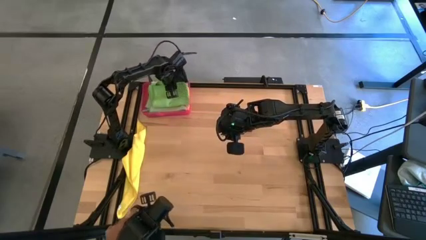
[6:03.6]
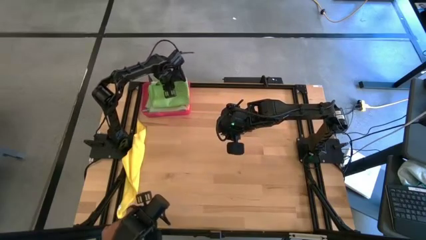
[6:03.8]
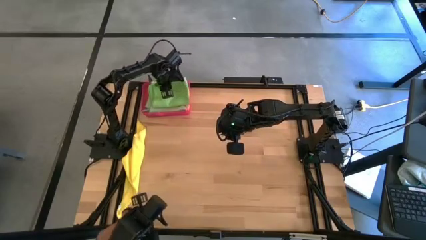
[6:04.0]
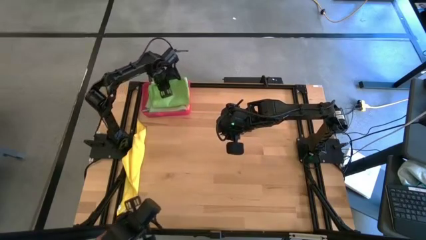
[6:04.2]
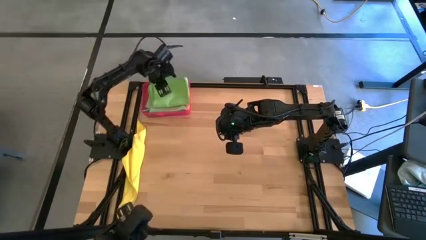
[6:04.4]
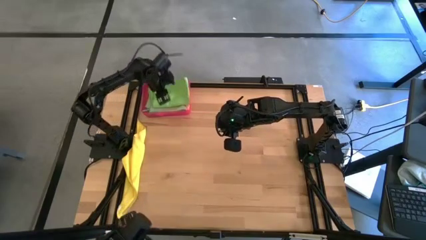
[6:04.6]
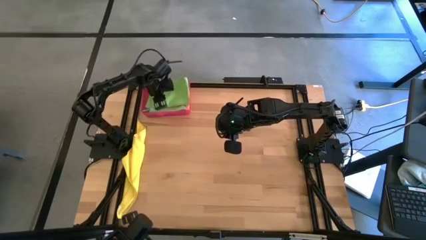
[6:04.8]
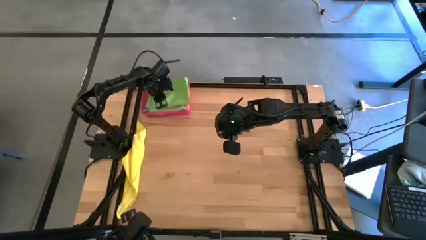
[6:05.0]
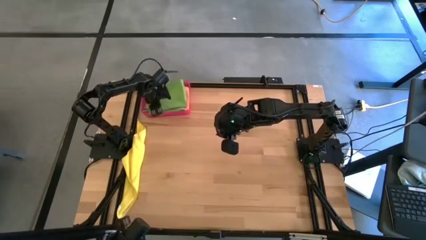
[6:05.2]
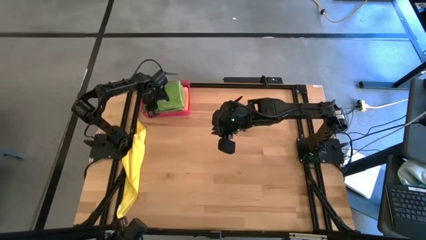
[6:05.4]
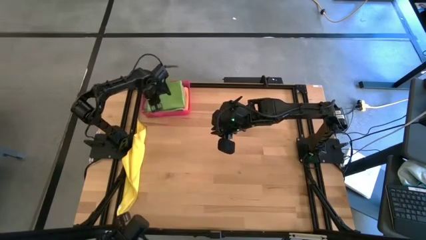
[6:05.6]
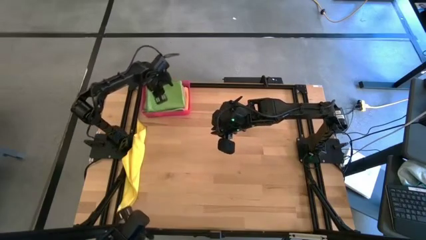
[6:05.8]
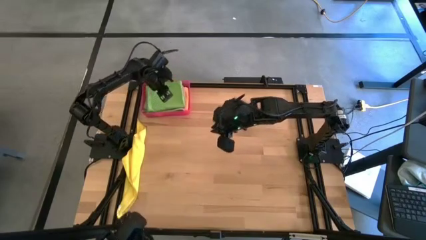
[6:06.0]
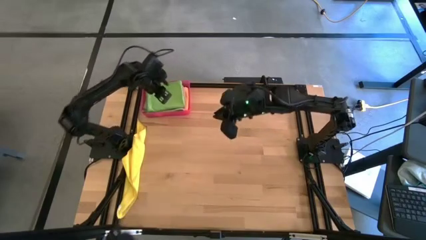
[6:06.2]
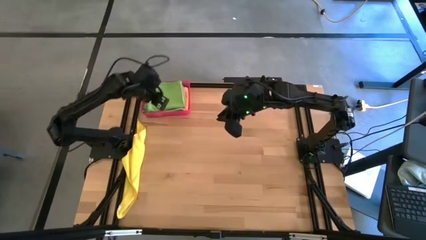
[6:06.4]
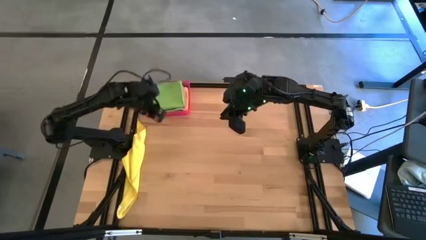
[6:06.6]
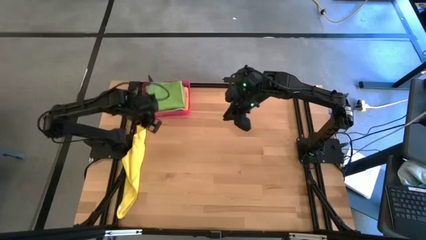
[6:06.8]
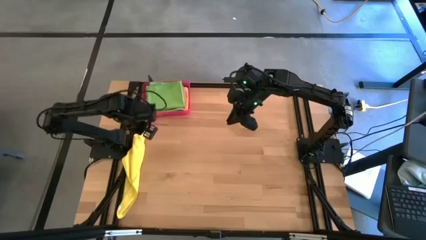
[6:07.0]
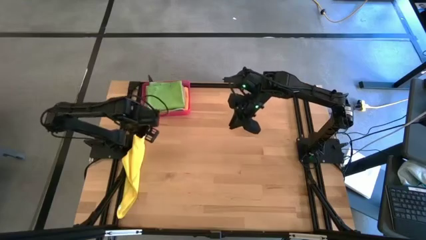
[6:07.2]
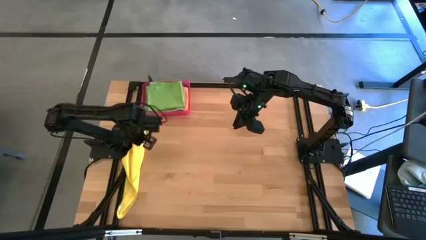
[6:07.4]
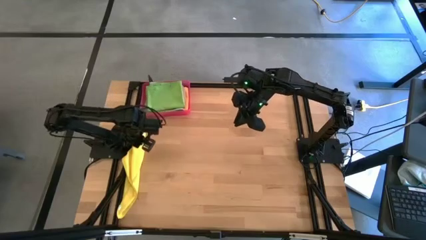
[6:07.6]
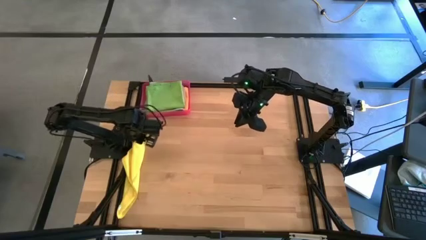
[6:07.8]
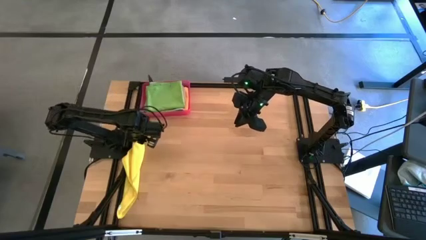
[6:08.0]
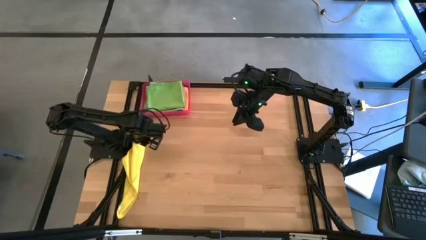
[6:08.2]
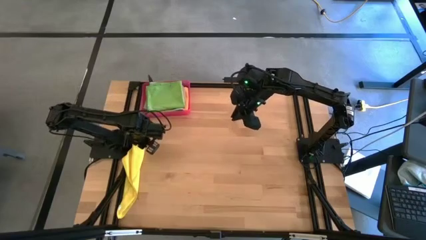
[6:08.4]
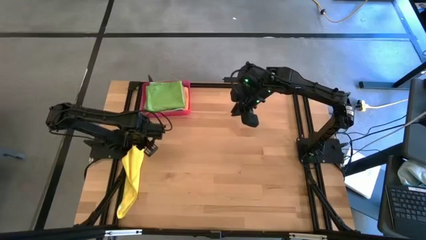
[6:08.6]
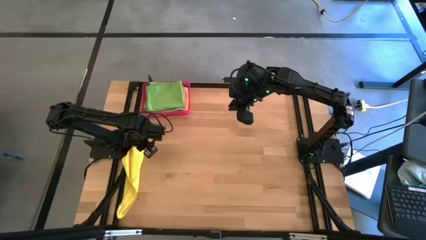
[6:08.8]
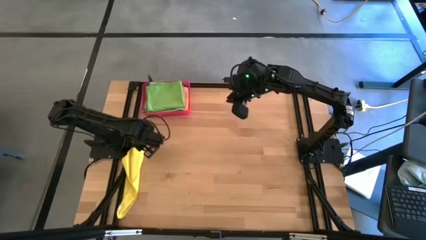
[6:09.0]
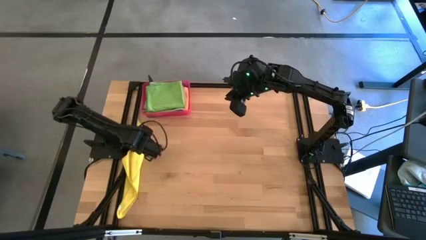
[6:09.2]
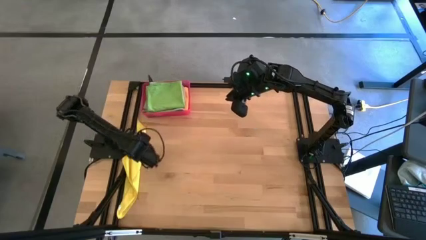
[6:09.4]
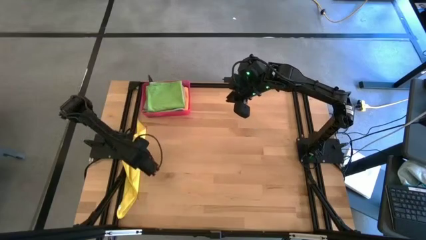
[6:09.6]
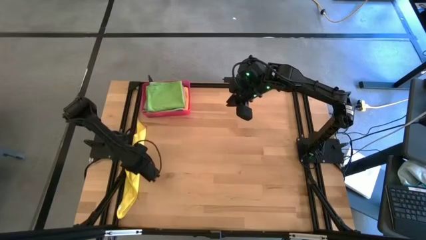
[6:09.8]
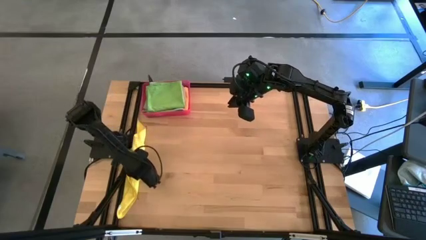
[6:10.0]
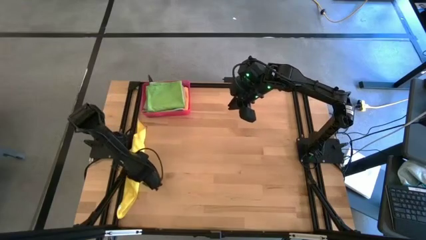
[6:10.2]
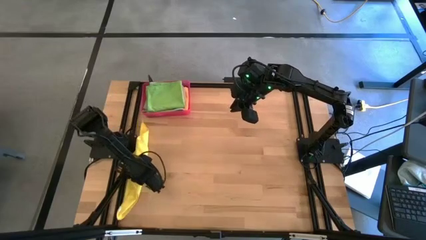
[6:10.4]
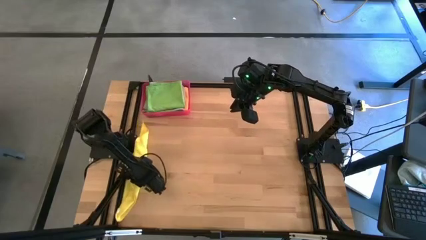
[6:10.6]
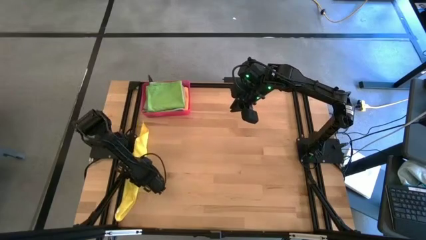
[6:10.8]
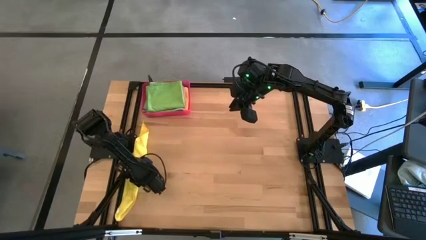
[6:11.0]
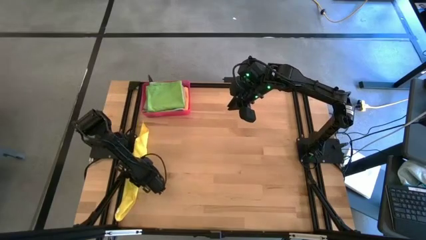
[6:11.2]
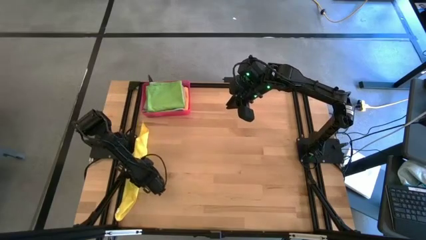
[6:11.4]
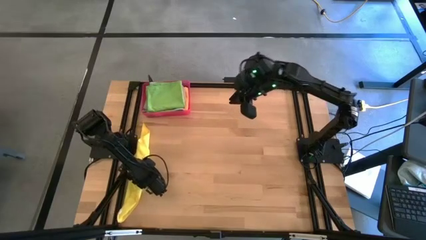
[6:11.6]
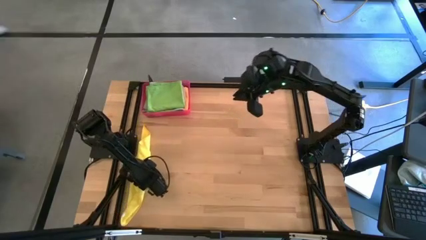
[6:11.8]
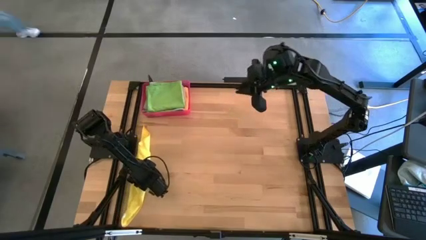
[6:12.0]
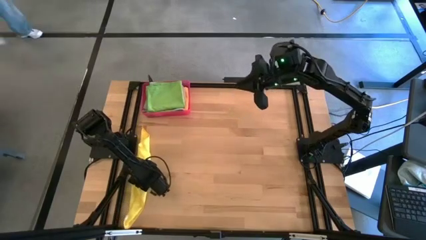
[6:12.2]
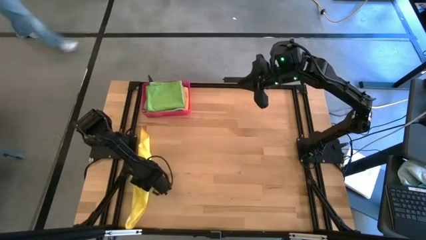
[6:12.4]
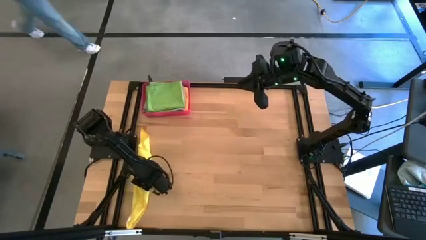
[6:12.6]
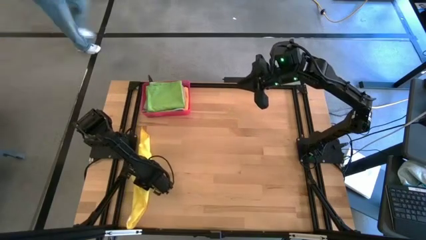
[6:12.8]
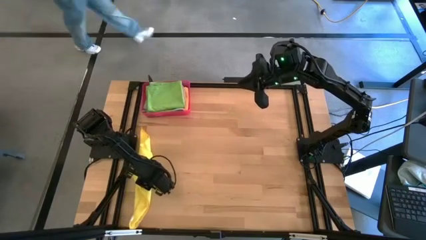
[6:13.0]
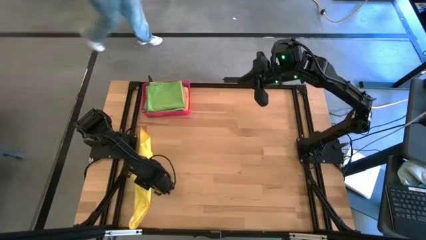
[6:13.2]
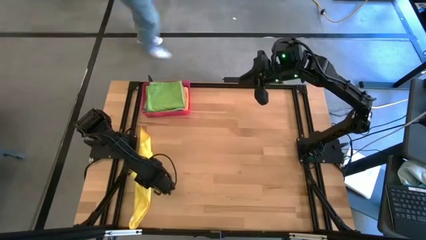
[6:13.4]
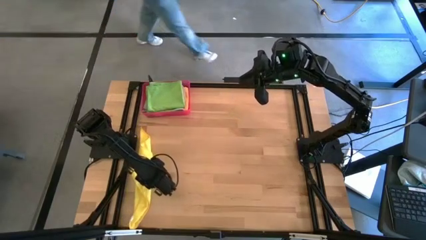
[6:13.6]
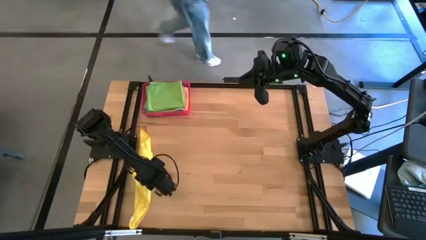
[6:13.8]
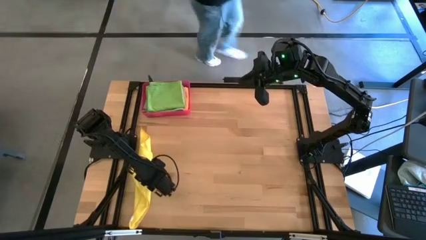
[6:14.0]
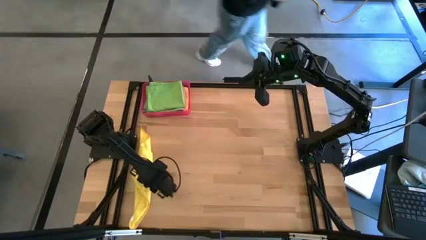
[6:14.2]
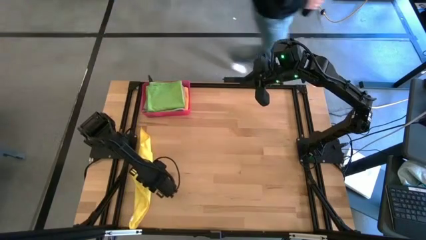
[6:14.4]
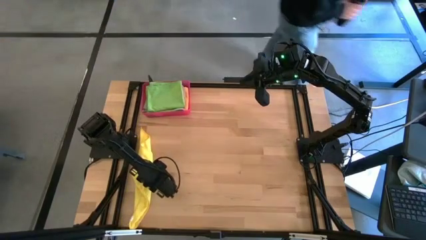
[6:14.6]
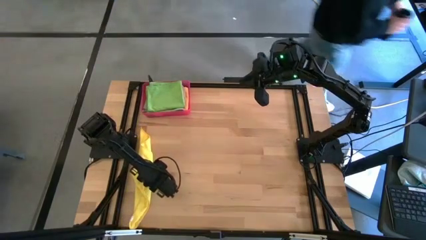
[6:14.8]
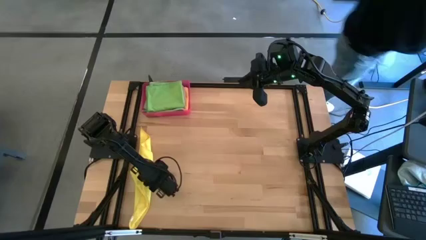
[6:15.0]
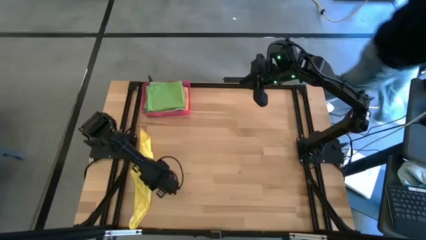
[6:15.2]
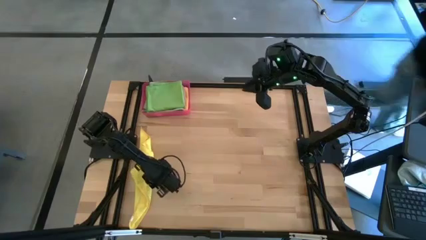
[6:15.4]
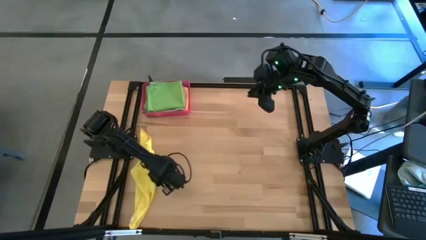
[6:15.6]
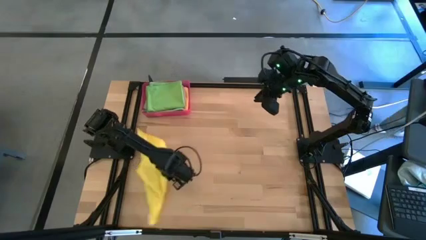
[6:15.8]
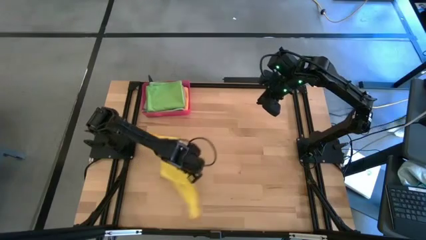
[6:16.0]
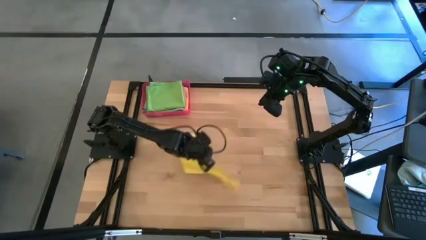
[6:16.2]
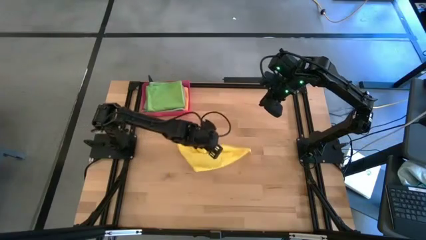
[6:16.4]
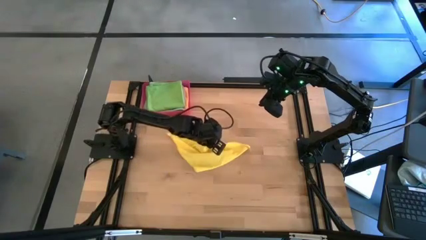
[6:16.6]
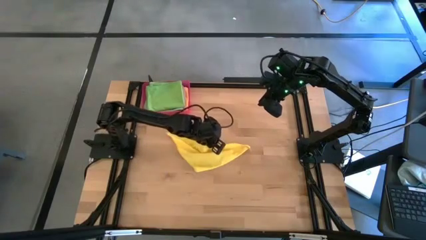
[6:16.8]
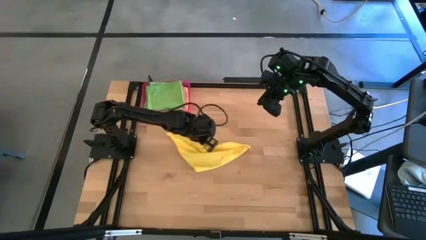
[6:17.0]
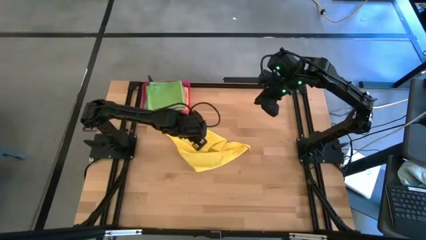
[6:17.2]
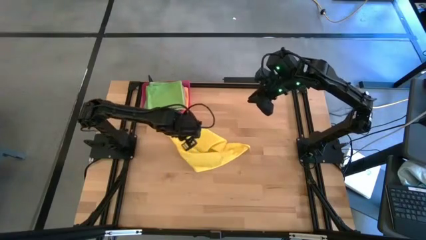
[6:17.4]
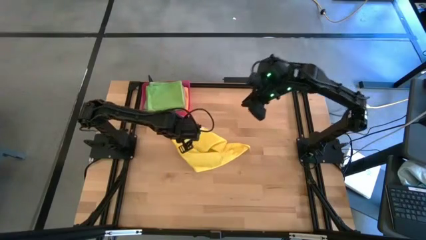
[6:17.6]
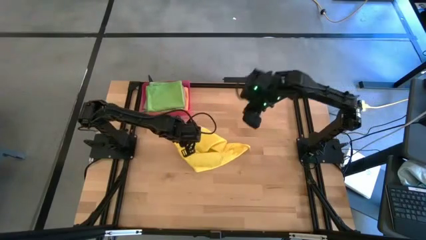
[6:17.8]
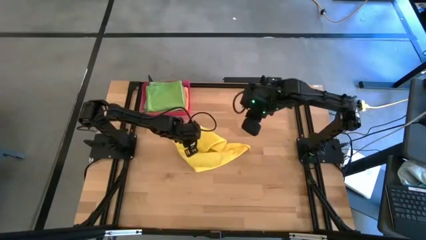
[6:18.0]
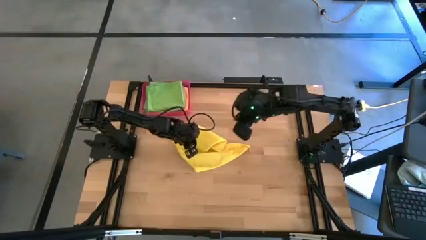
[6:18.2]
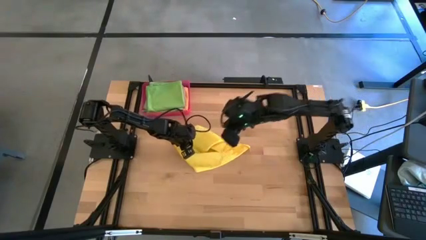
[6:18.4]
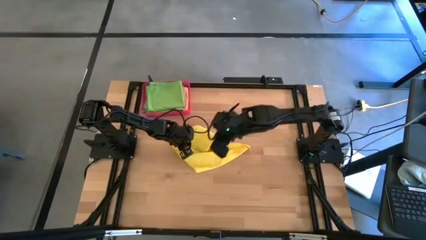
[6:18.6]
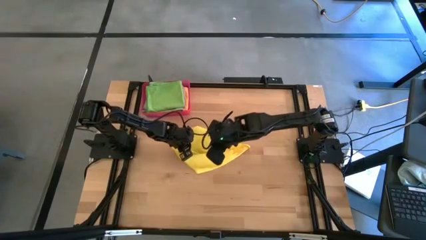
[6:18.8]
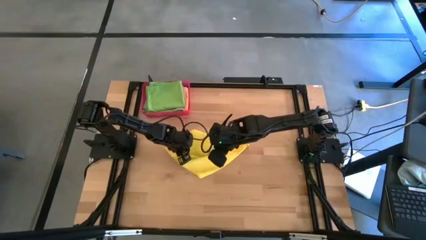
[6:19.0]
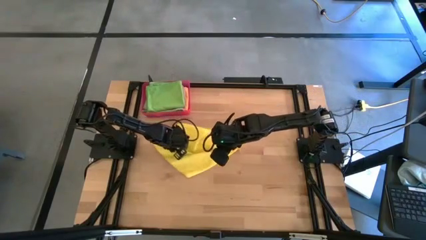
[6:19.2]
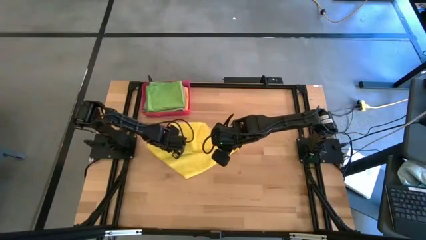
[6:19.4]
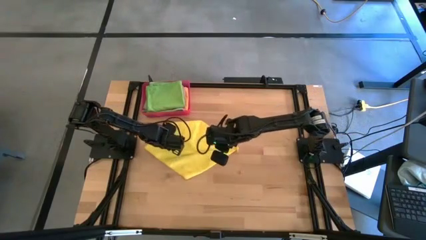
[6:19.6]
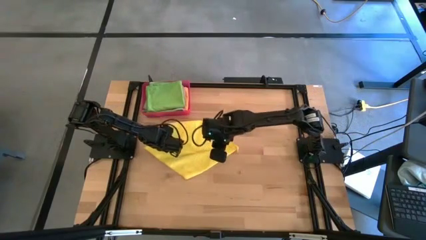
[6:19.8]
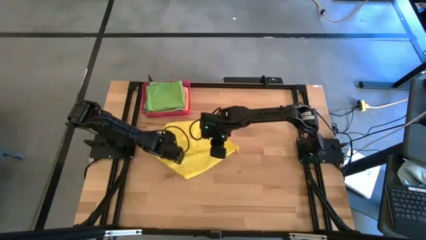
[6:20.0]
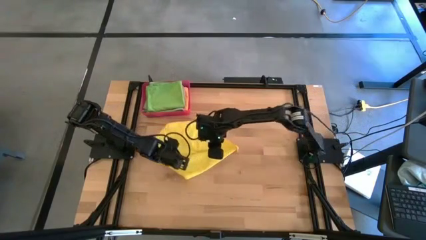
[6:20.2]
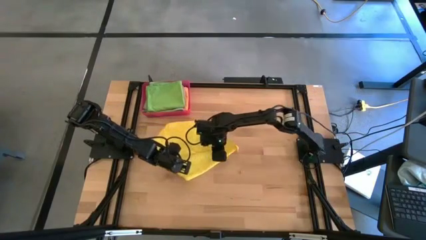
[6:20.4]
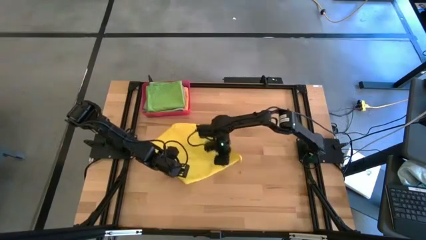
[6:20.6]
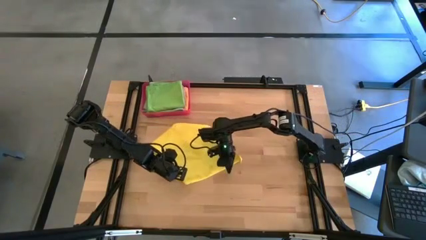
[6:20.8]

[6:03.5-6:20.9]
Task: Fold microfiber towels
Fold the yellow microfiber towel
